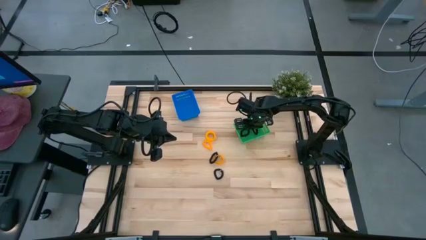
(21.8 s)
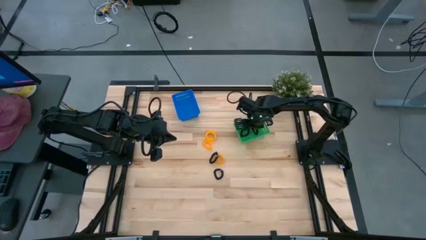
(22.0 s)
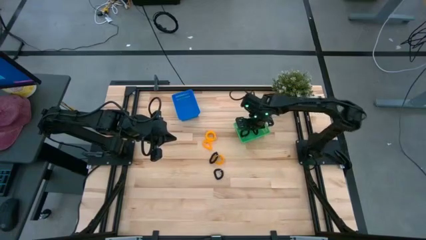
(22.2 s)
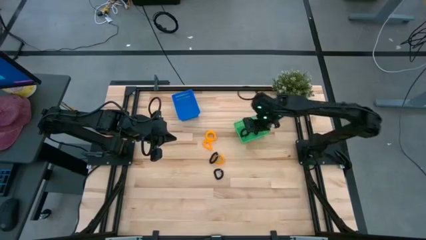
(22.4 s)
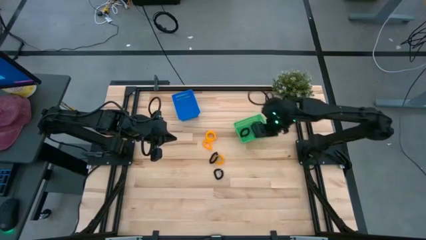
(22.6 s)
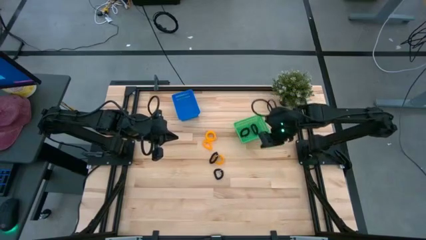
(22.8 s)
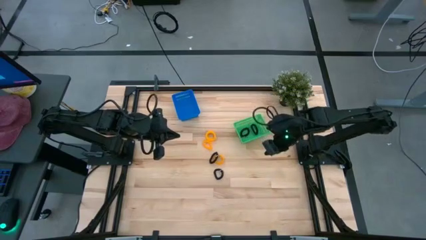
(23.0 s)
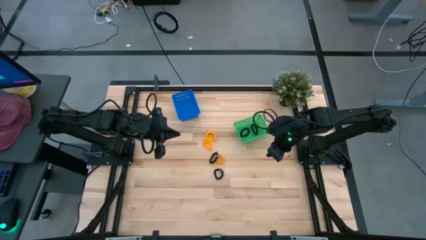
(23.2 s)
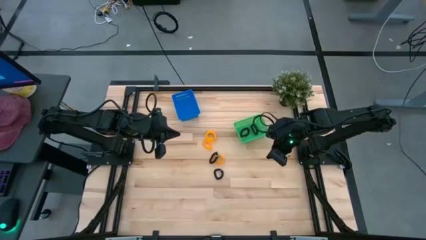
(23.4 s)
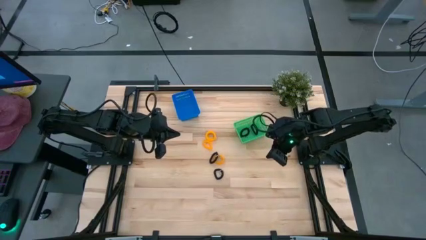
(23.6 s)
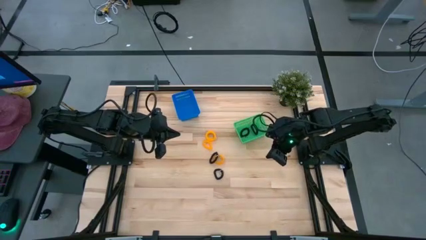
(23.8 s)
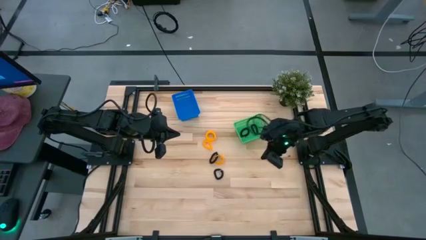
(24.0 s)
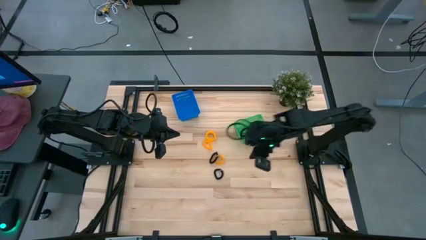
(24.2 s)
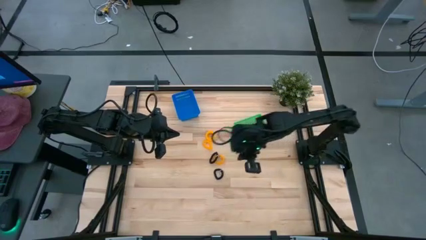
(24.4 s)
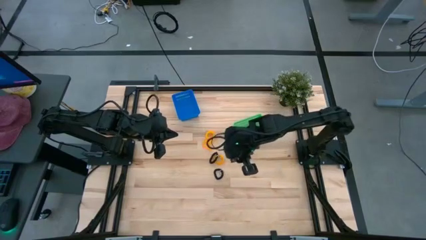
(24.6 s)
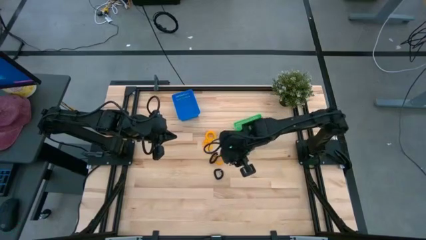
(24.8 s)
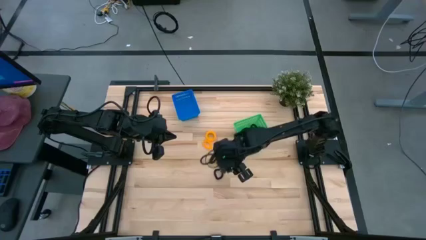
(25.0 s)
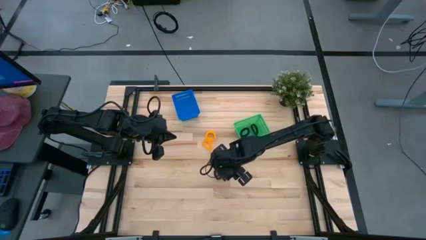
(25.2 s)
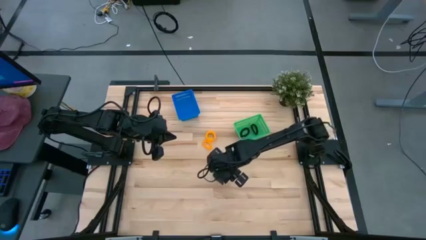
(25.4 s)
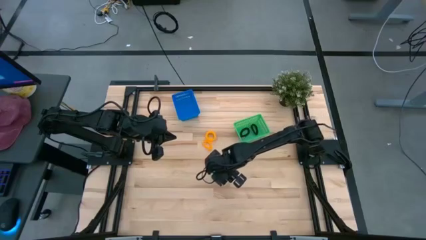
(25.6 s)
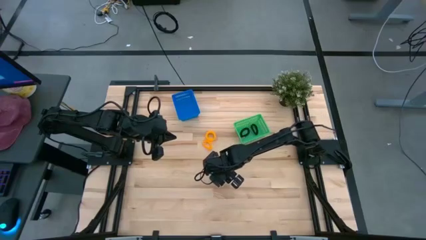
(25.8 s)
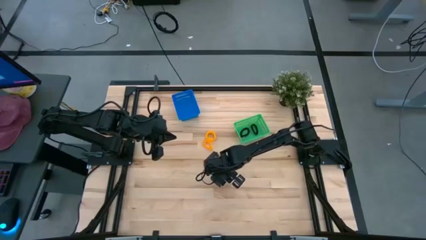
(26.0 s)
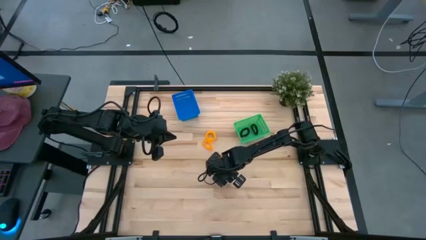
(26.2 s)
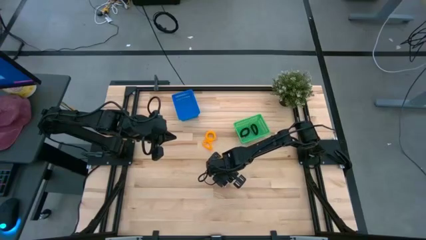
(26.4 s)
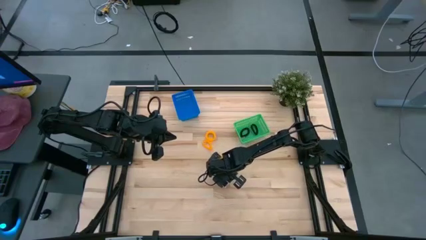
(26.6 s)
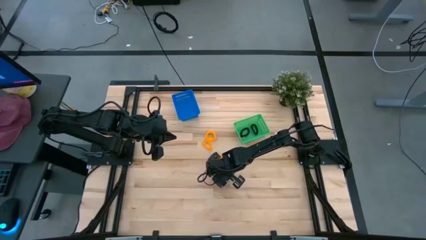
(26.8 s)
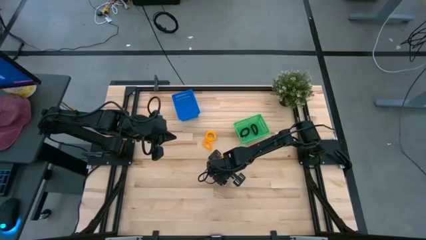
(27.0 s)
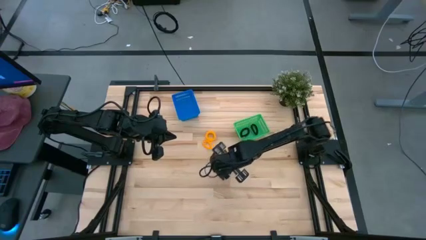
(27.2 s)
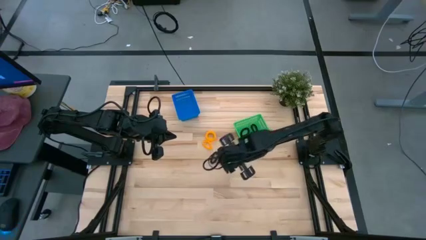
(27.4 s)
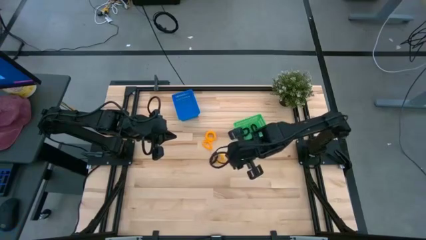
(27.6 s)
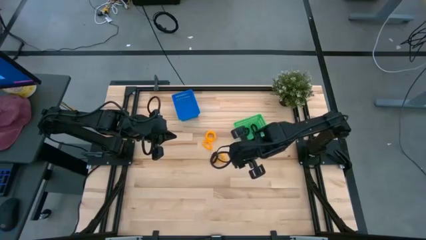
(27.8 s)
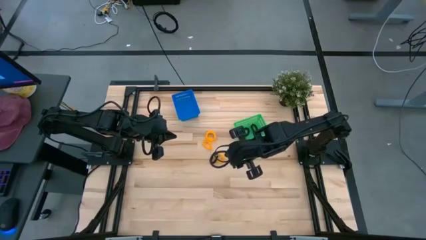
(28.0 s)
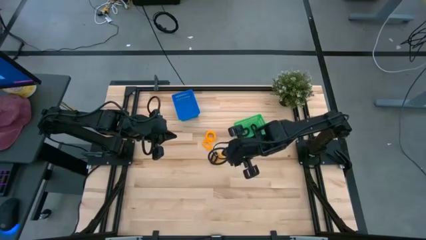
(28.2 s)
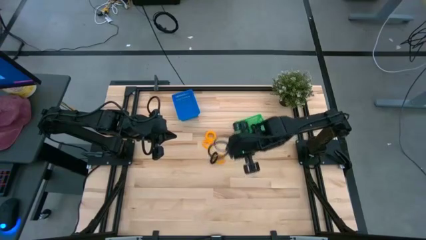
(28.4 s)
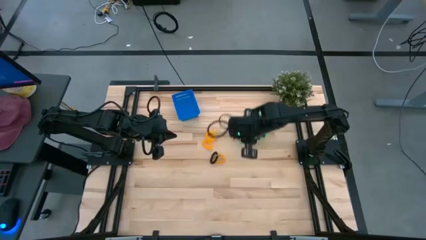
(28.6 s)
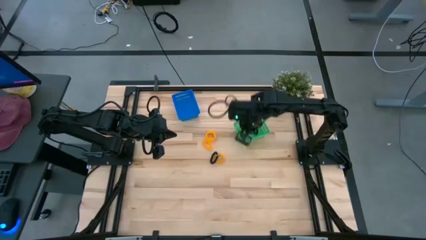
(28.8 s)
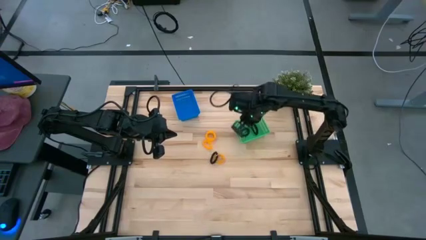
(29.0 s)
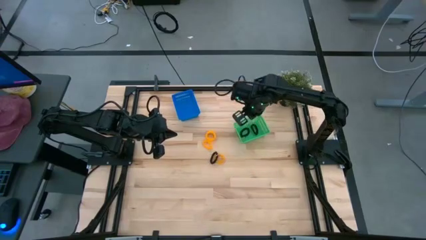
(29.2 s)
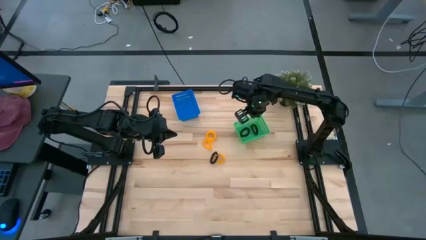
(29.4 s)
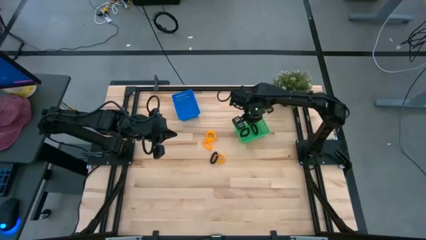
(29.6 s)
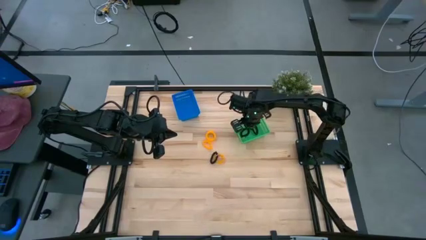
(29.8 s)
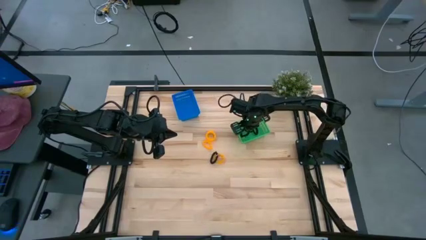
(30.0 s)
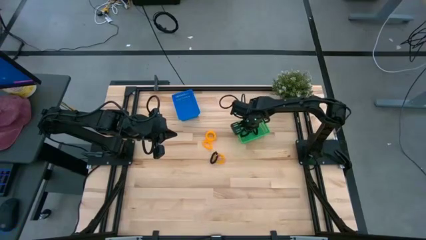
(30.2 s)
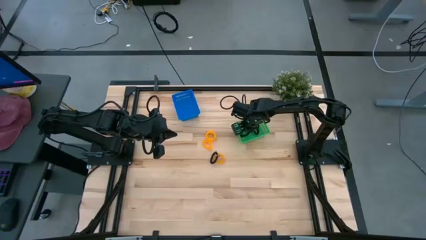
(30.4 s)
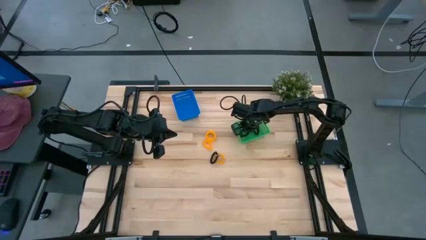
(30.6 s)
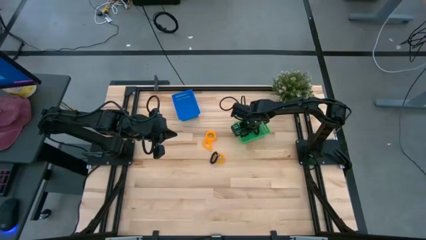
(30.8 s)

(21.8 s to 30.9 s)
Task: Sort spring keychains
Put the black spring keychain into the green bin
